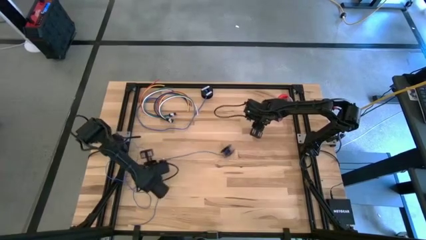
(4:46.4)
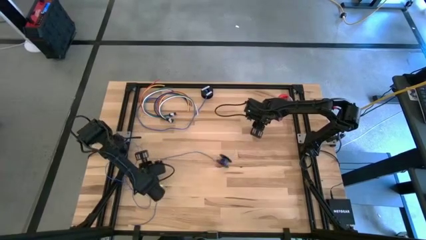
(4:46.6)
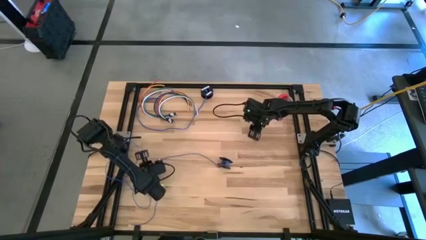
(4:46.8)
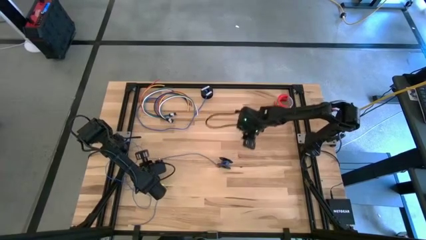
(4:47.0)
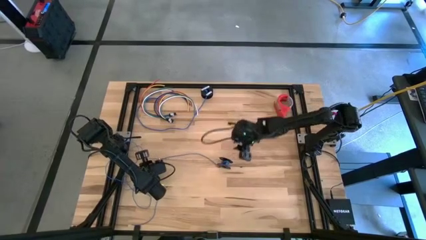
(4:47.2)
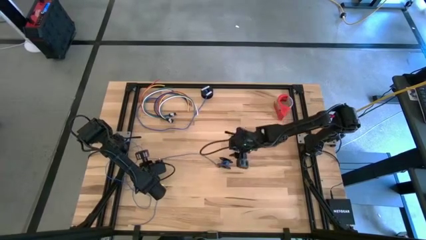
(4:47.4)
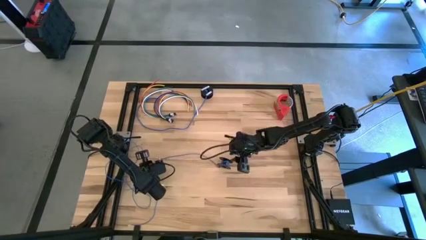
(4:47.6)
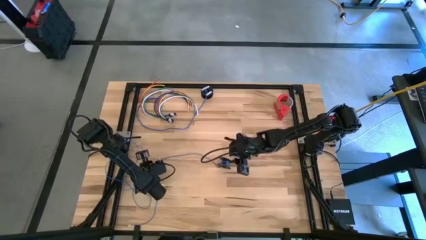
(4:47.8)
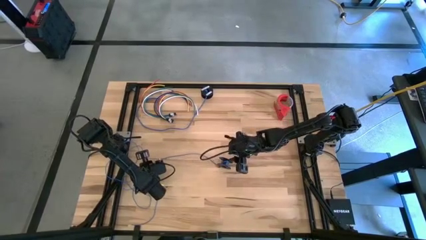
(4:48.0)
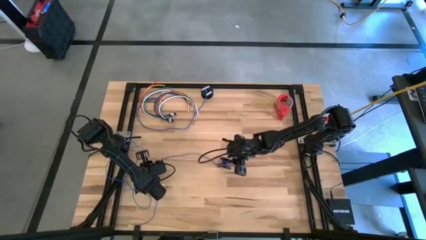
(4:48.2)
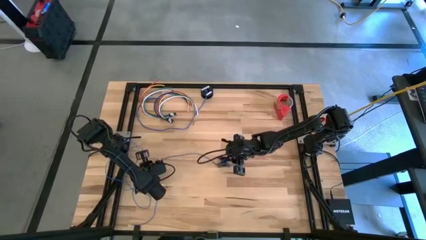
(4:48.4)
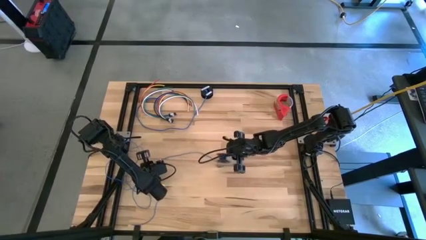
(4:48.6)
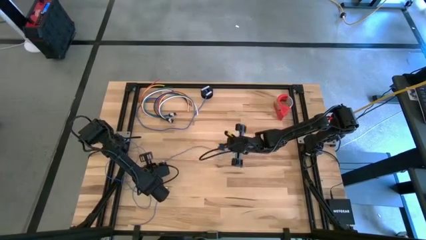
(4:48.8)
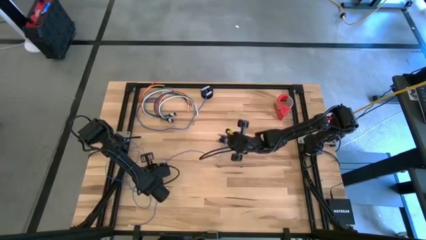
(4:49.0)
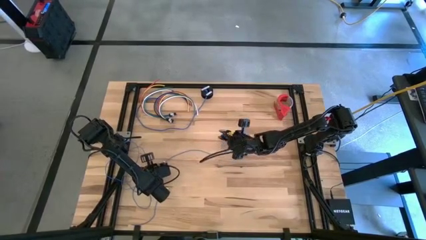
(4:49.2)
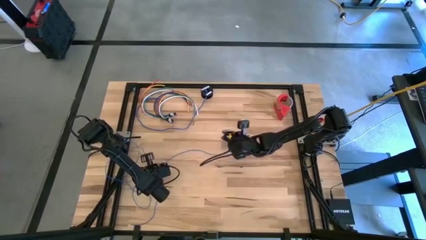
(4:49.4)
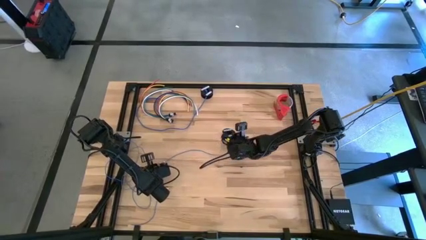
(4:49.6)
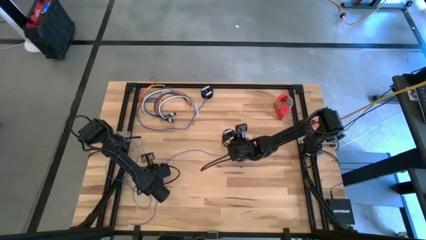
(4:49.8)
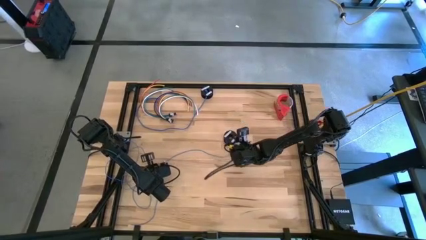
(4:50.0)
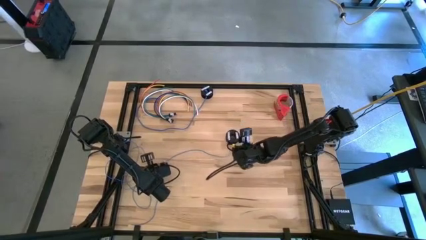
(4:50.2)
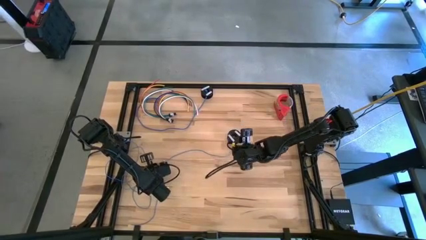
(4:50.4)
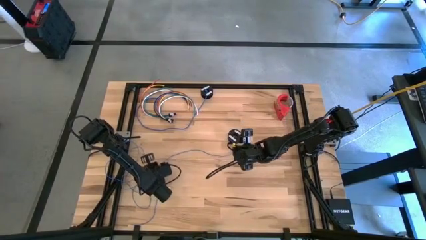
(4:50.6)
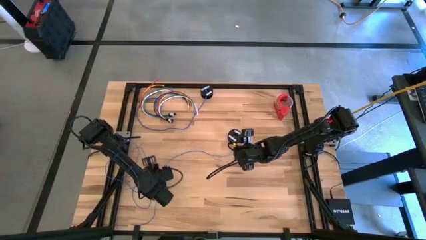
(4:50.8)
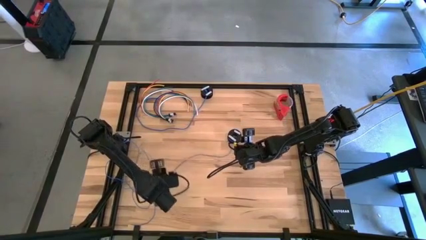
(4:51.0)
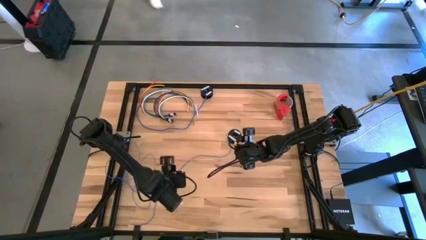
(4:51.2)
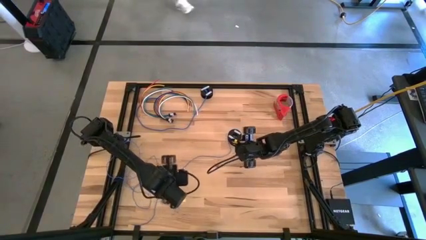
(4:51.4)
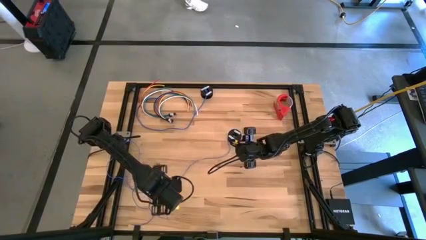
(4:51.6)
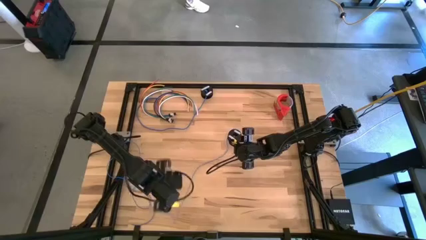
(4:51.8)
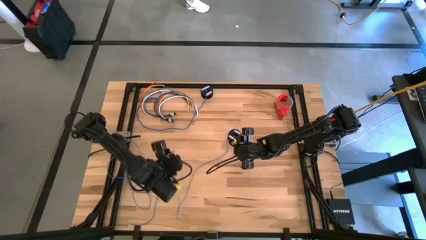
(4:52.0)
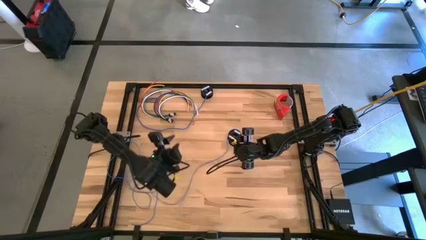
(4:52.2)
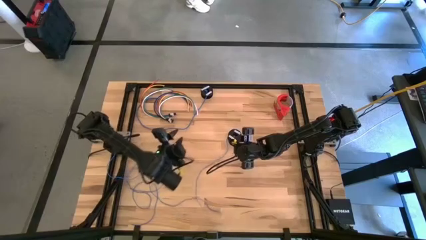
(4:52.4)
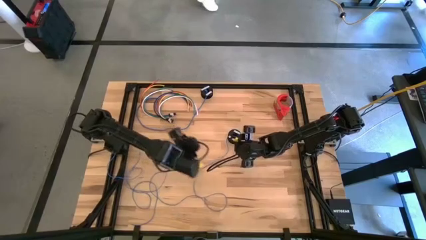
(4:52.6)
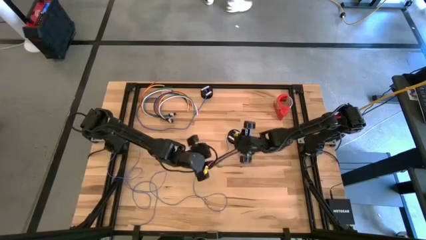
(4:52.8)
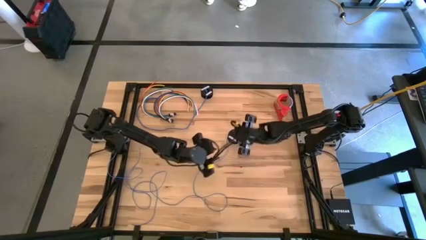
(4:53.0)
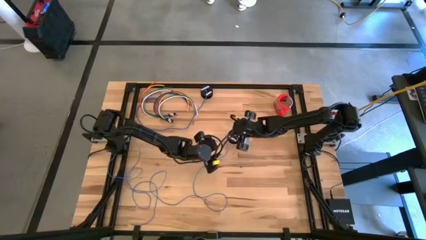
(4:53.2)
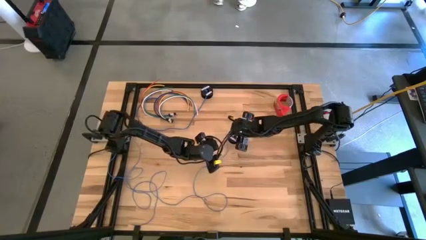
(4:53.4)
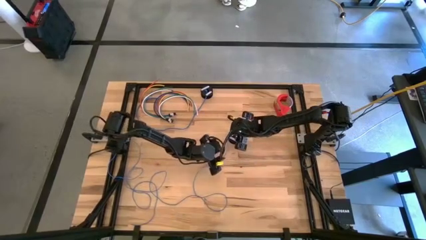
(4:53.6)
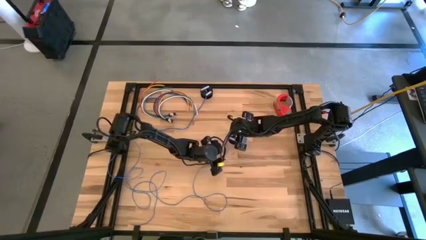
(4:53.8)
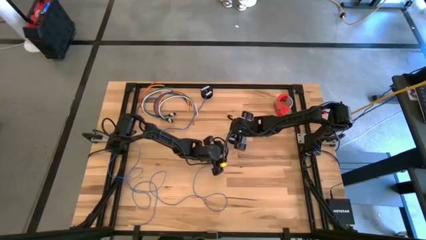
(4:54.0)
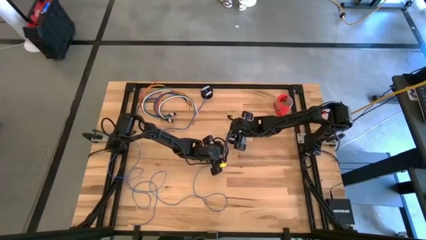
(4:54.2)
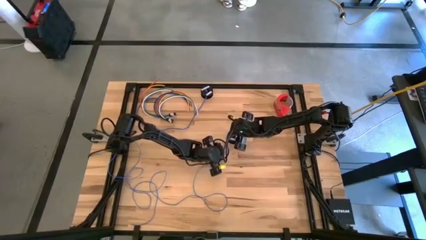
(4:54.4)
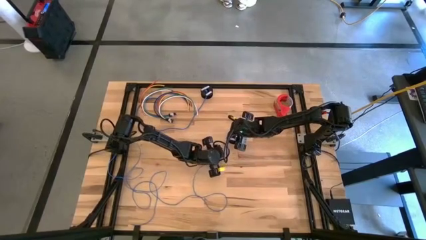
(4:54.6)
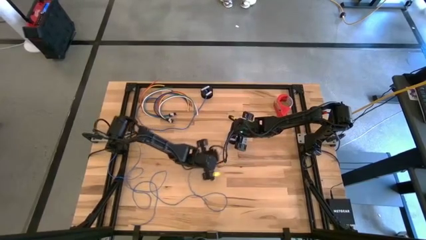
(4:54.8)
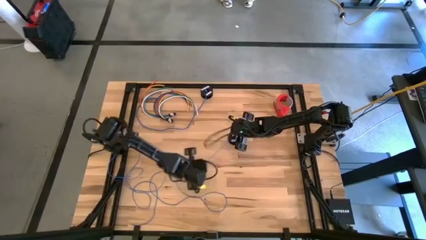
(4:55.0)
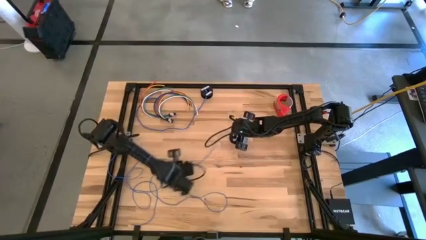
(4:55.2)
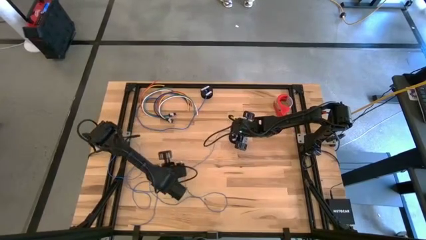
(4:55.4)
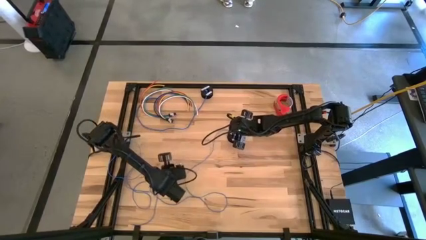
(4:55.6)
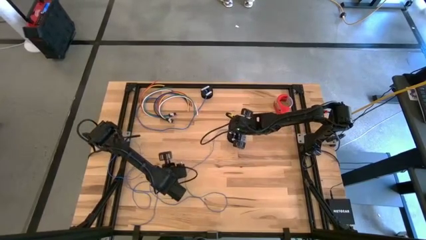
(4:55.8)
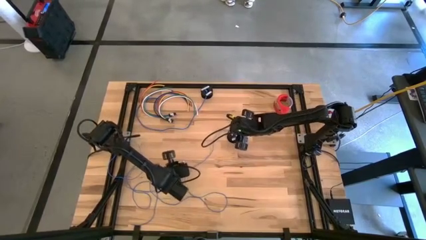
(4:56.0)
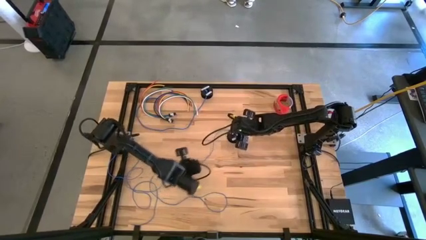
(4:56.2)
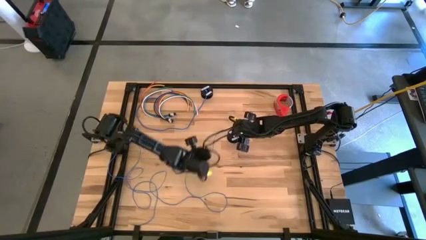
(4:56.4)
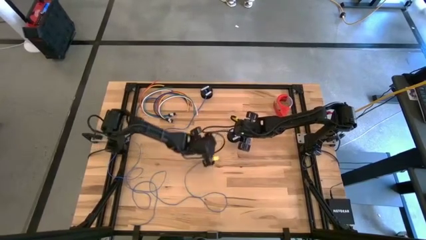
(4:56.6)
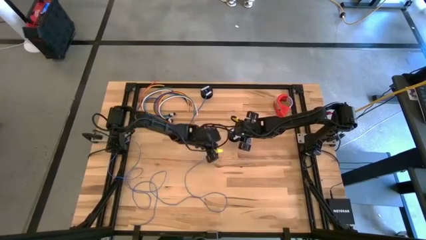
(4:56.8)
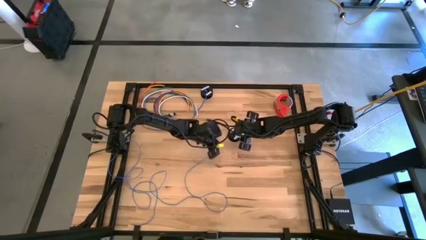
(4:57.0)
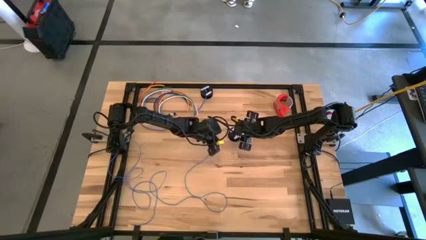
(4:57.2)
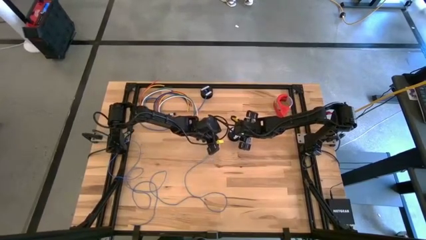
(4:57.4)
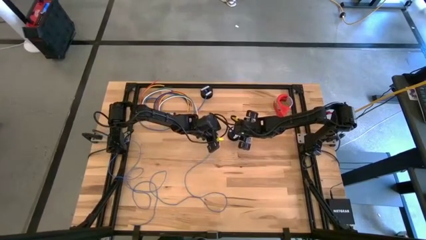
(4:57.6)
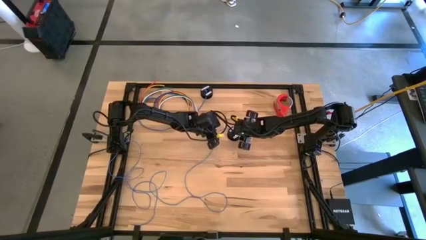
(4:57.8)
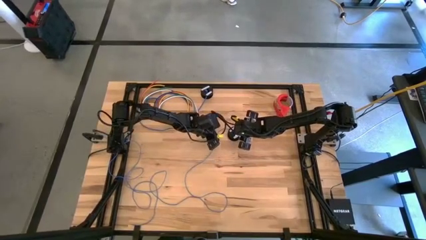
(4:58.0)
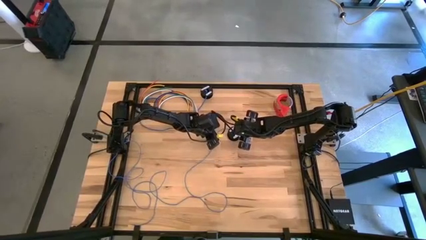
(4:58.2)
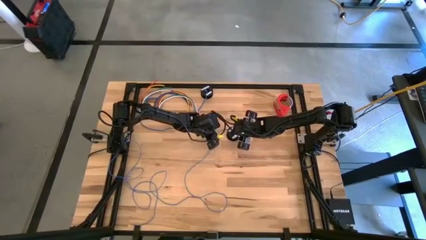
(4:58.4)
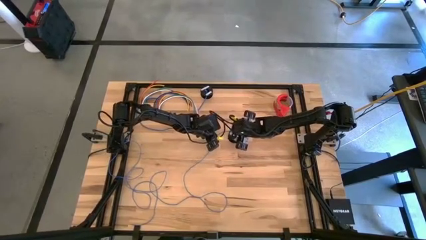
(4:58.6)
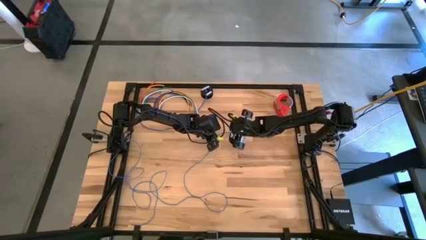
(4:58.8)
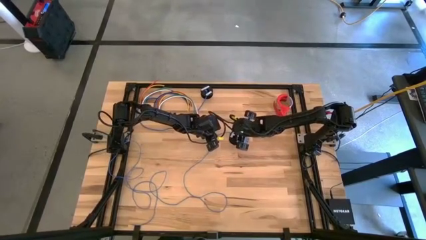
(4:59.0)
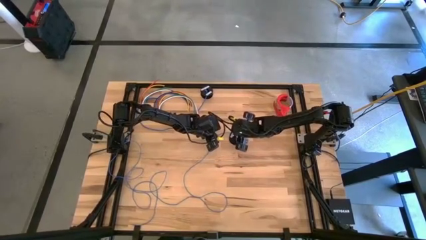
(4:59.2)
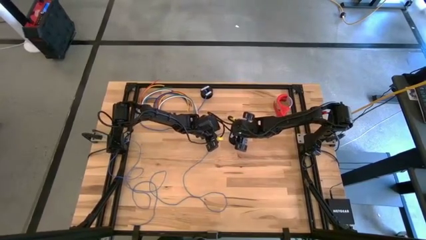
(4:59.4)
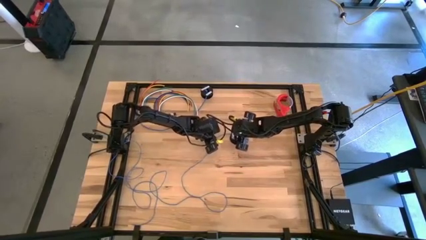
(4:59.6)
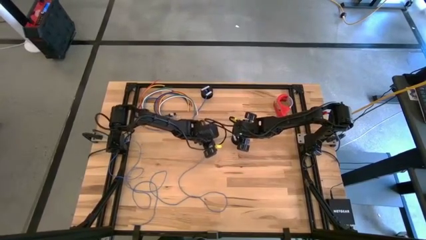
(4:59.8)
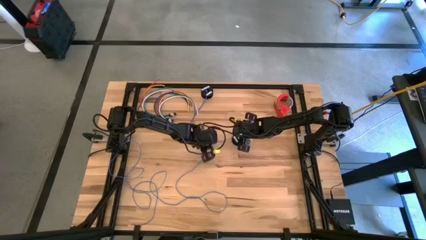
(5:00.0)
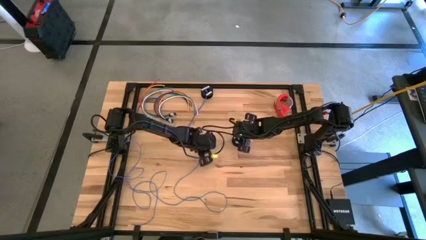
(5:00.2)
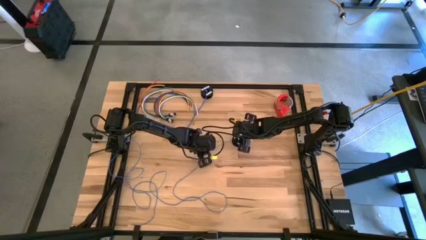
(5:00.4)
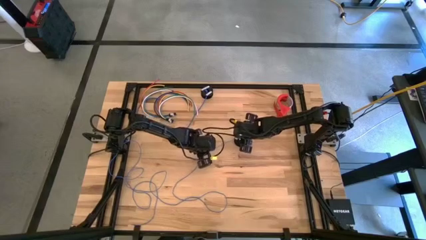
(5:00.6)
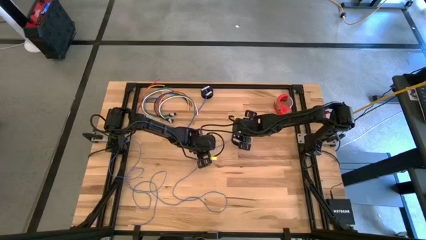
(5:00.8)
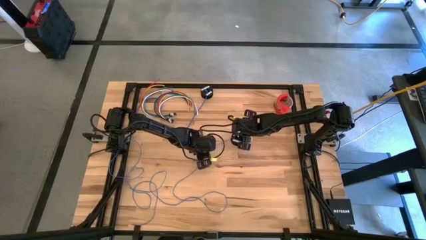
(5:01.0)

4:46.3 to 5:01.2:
Task: Coil cords
Uncoil the blue wire from the spool
